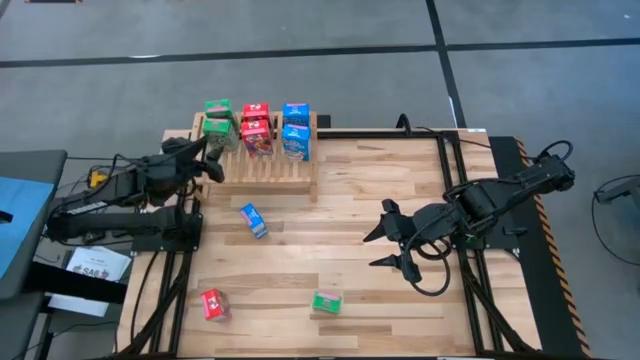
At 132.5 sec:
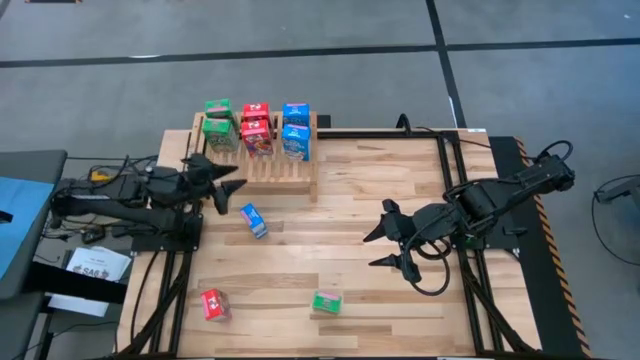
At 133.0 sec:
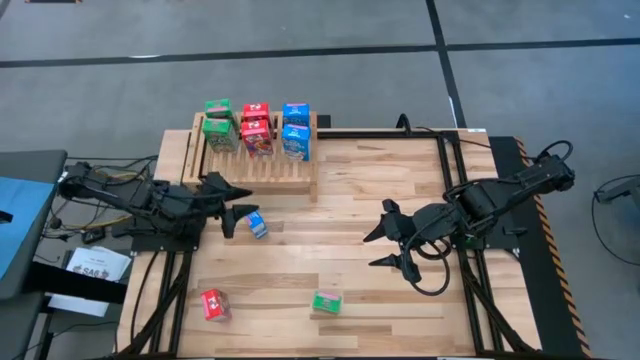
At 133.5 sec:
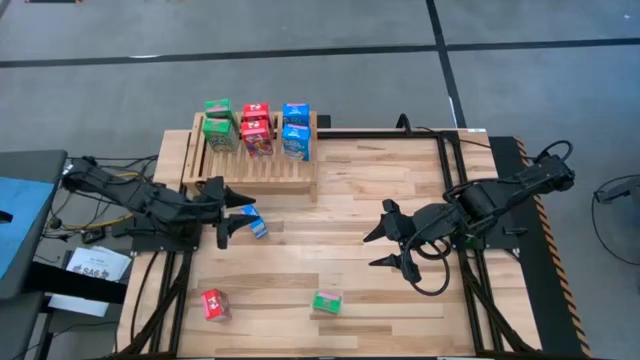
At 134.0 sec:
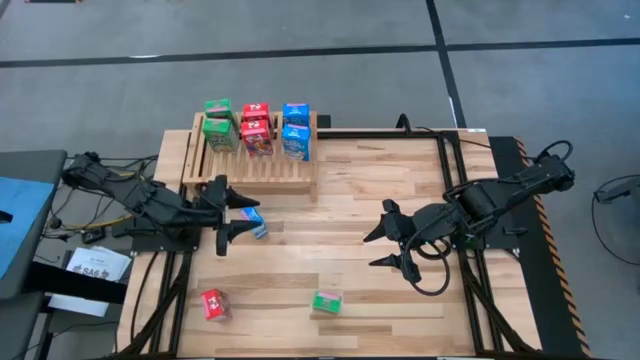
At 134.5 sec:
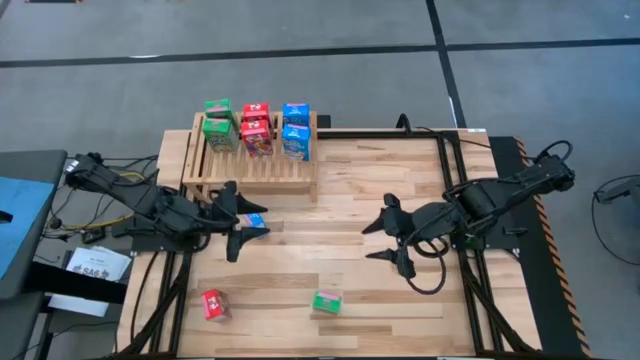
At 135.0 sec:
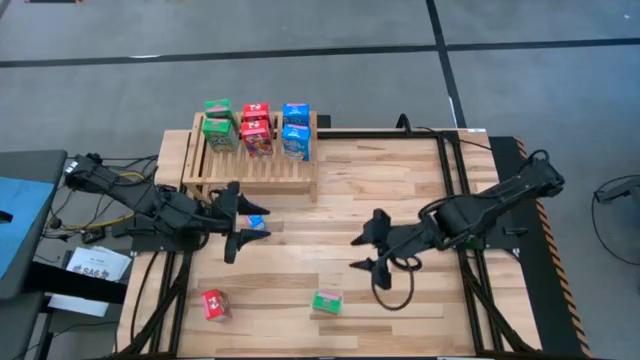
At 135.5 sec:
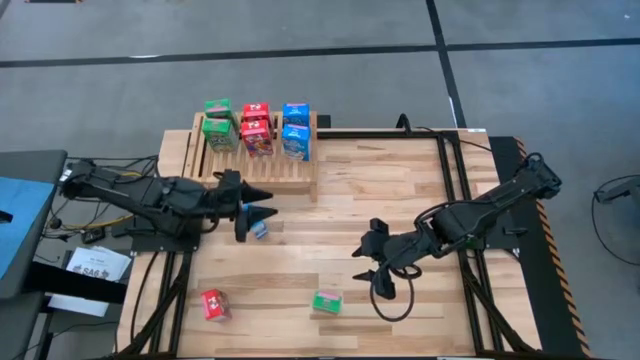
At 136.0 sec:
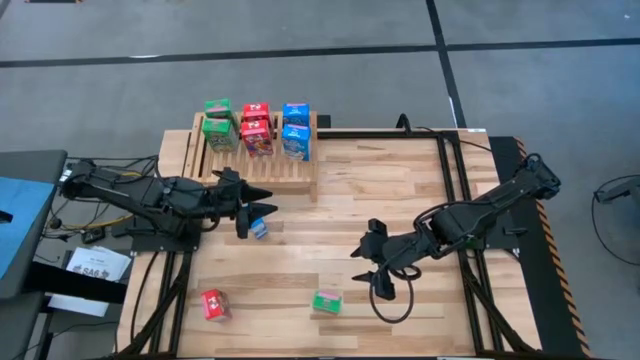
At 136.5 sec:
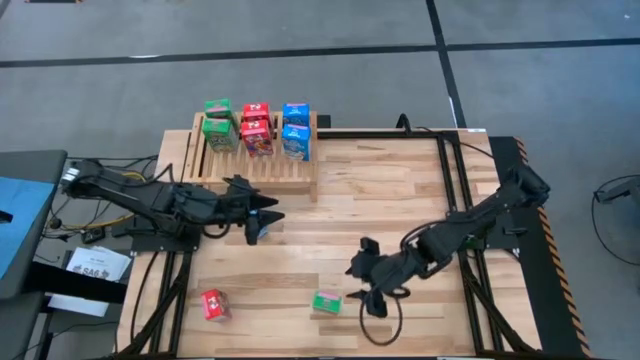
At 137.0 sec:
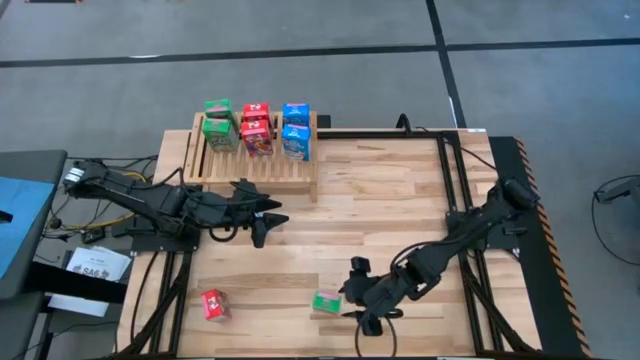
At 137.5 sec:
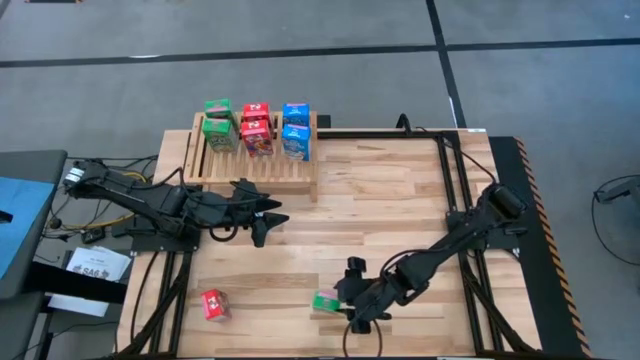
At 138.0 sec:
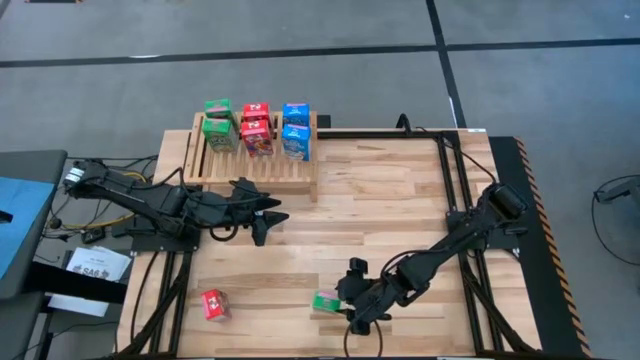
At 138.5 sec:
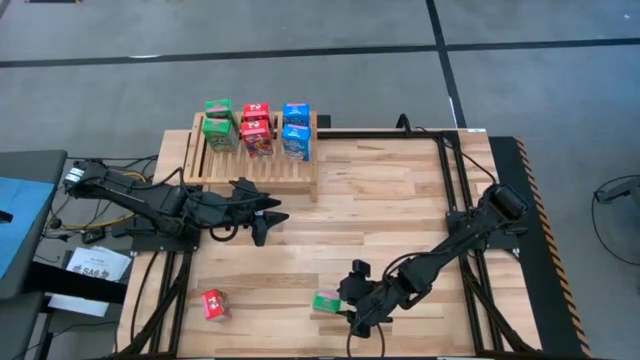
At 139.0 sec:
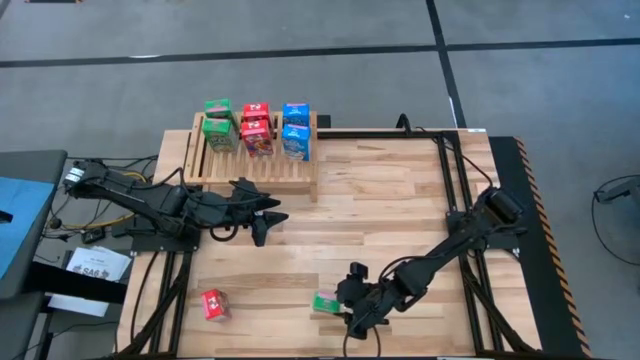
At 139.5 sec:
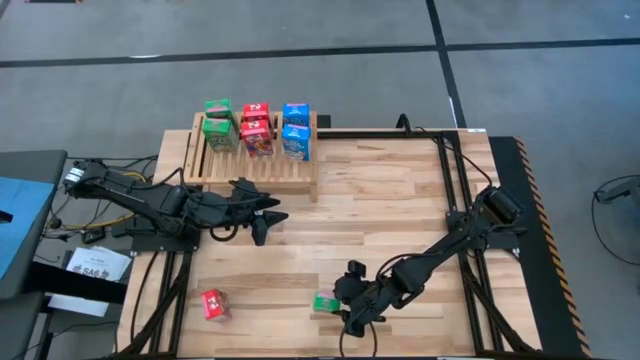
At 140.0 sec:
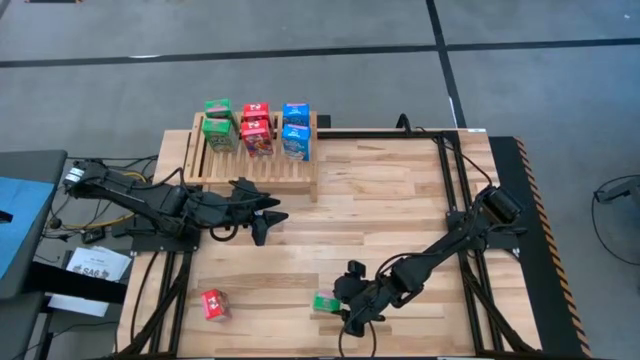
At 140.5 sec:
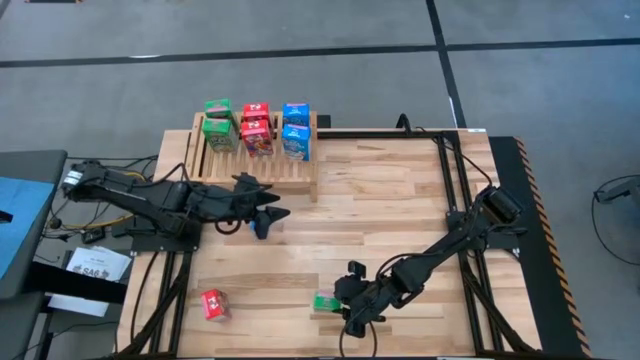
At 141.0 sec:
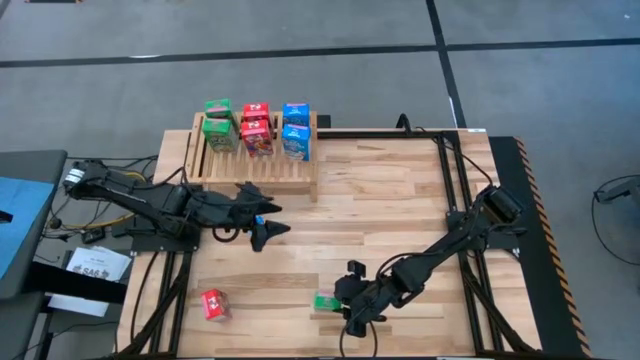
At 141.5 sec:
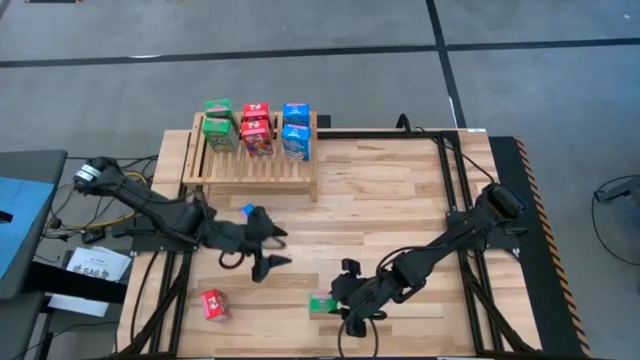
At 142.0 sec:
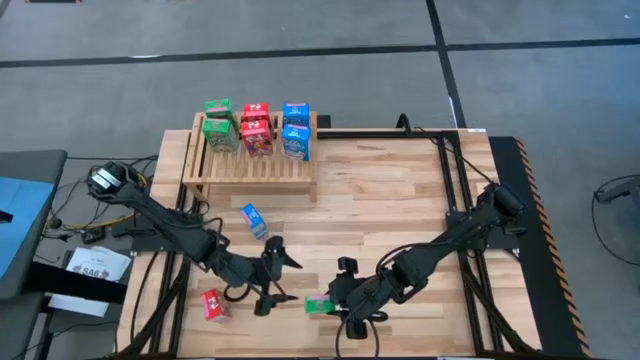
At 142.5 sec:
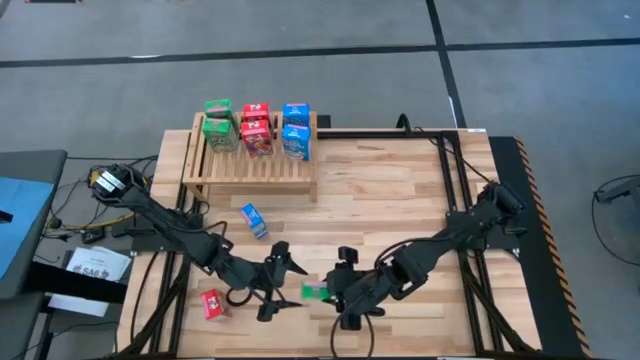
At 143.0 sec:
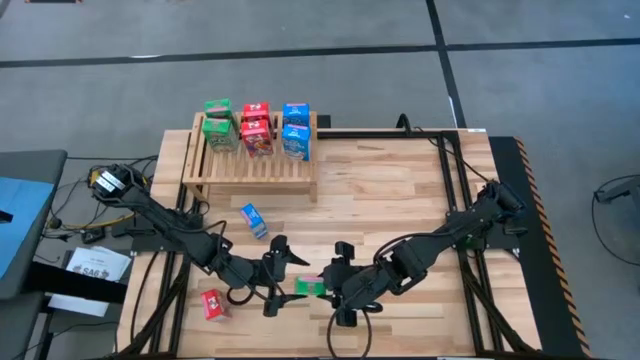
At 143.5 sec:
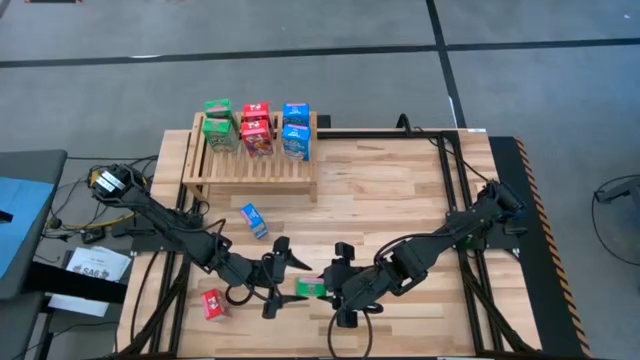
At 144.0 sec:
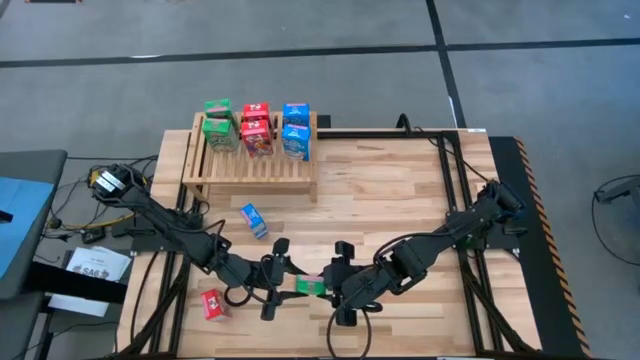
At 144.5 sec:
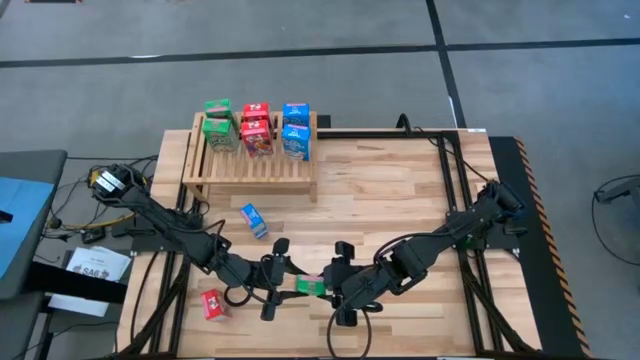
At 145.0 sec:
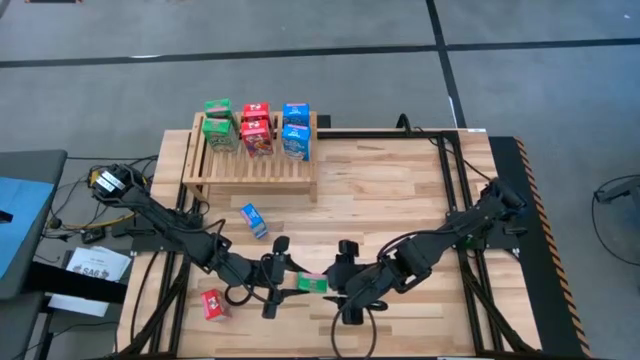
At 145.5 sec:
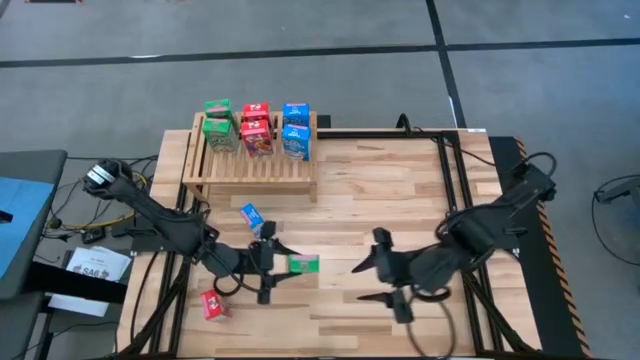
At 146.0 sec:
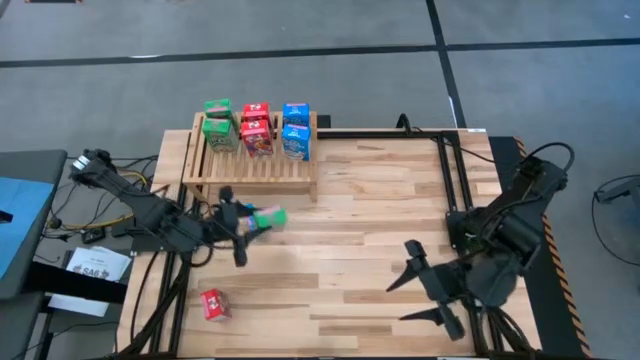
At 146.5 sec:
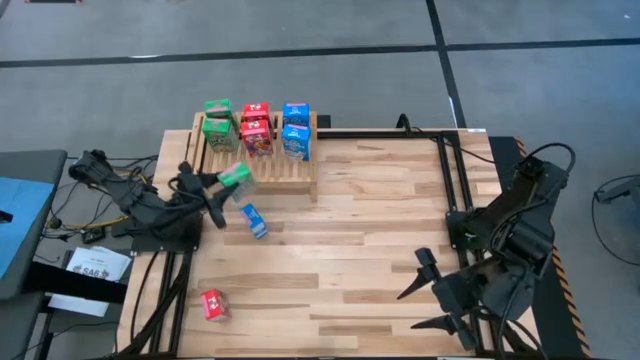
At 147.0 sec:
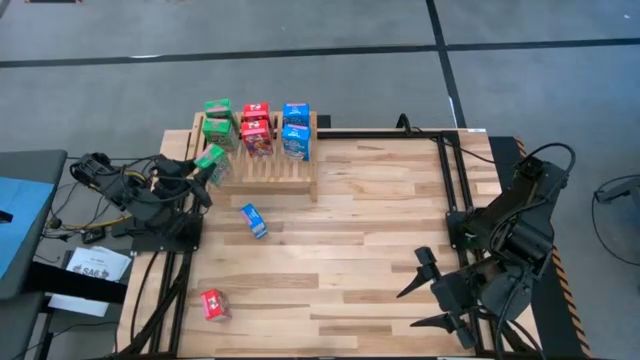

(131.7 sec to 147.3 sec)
Task: Stack cereal on shelf
Put the green cereal box on the shelf aligned with the other green cereal box

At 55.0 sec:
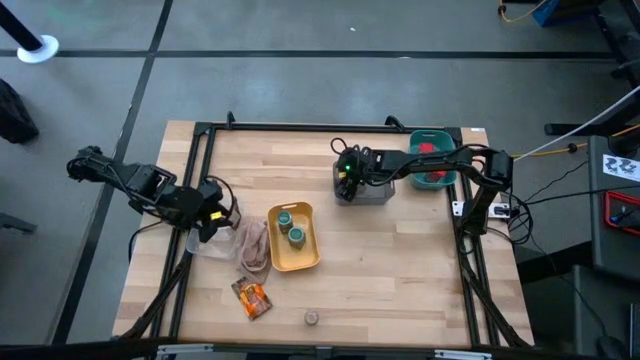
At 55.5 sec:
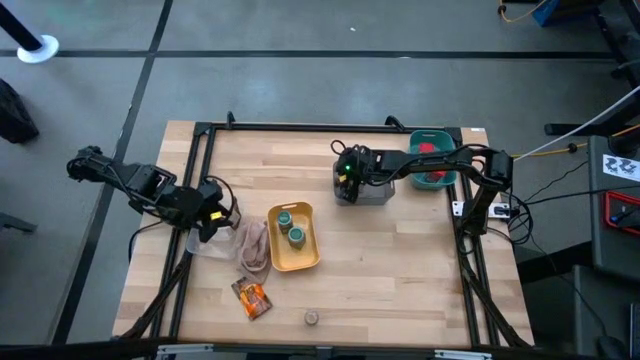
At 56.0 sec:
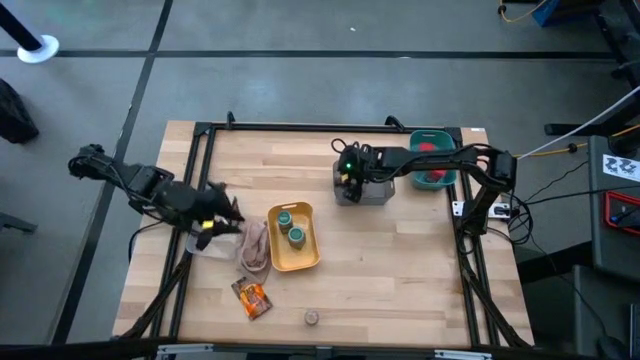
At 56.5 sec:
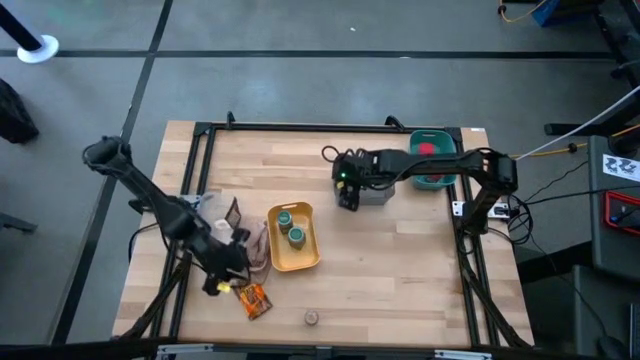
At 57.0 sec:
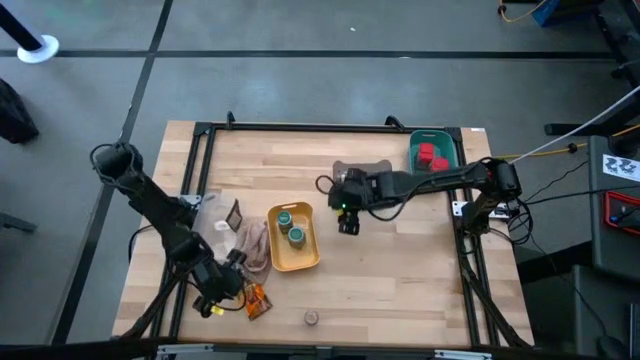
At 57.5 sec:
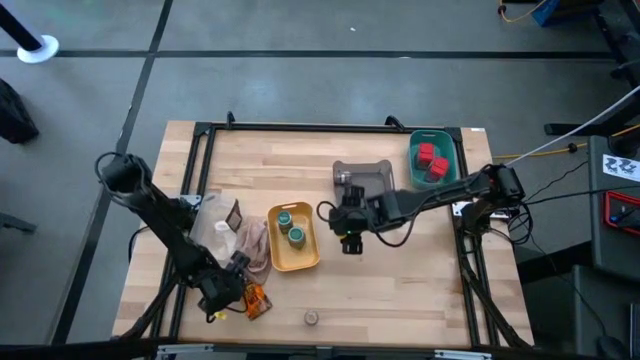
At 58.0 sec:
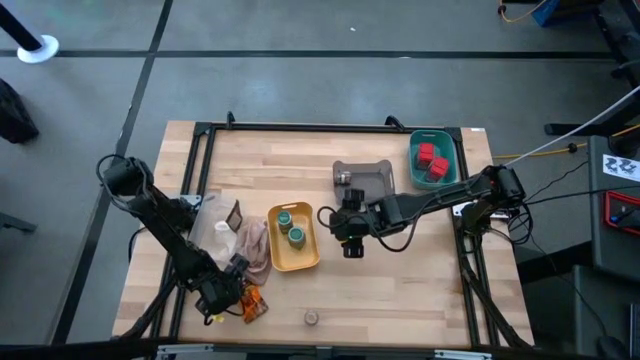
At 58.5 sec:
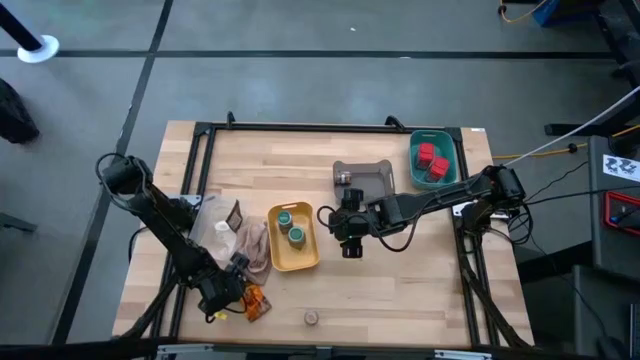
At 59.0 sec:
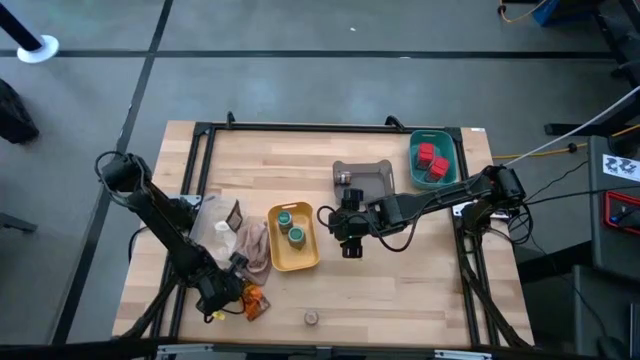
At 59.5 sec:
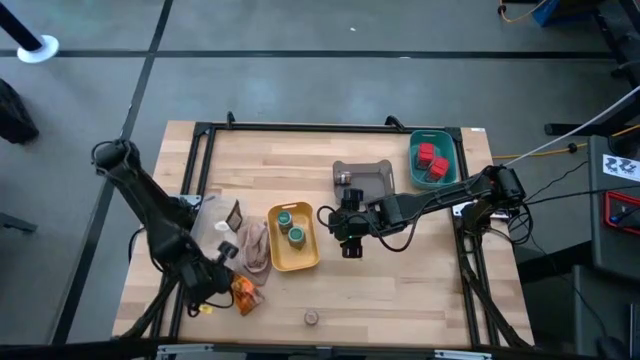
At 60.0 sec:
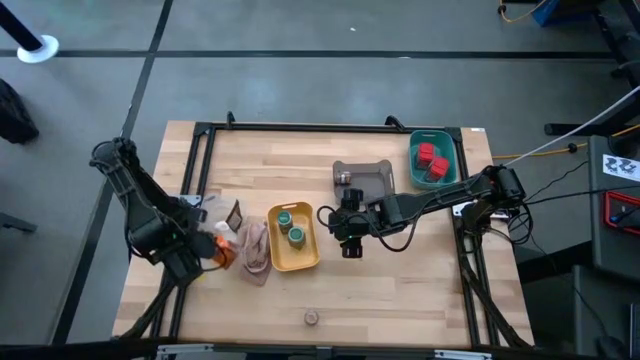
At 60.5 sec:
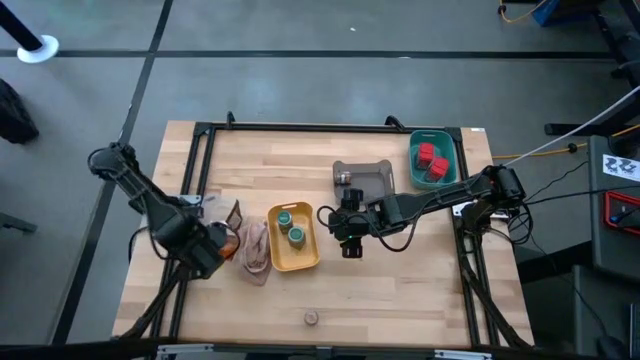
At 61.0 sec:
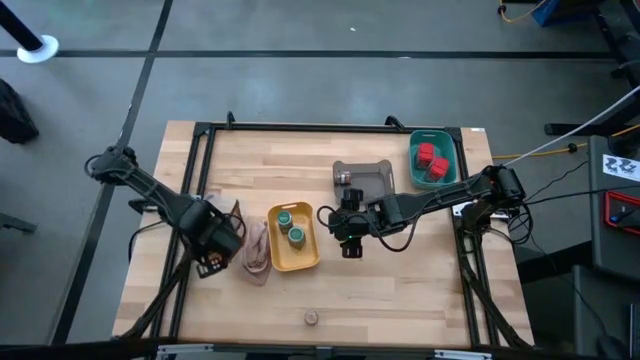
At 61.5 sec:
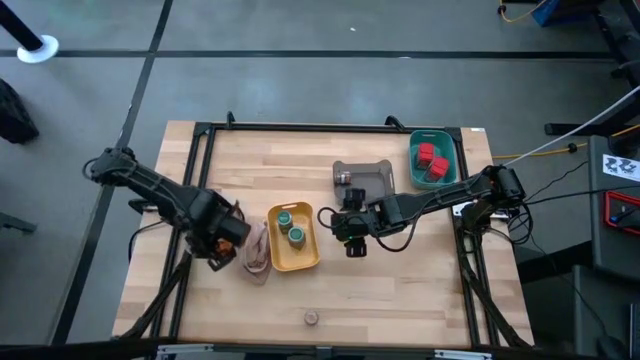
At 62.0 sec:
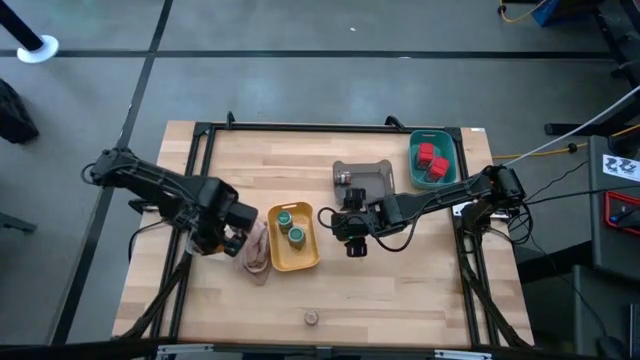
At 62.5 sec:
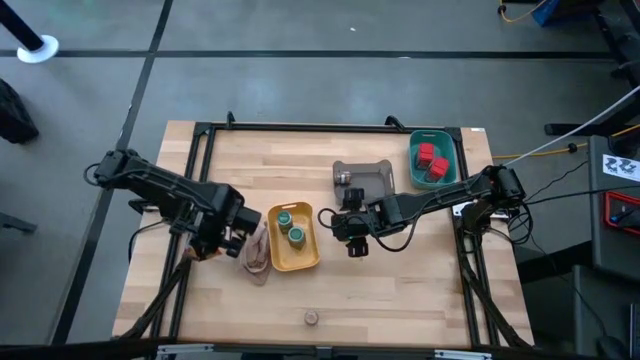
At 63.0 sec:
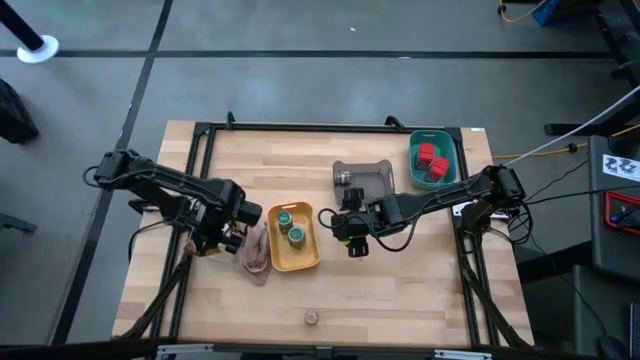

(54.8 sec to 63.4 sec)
Task: Sort spices by type
Put the orange seasoning bag into the transparent bin
